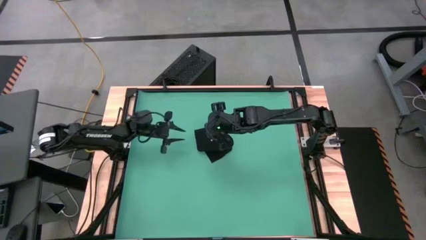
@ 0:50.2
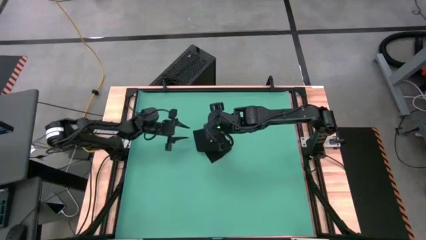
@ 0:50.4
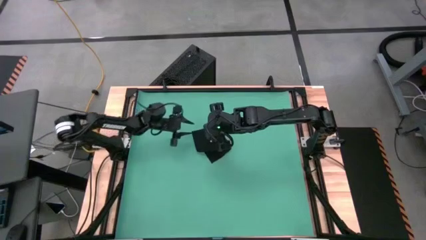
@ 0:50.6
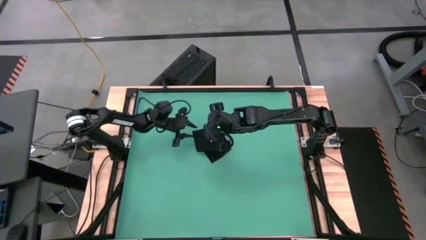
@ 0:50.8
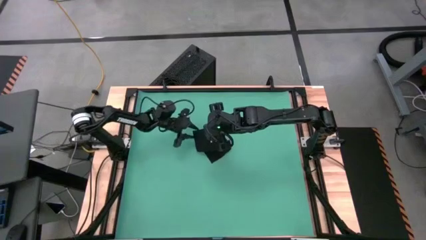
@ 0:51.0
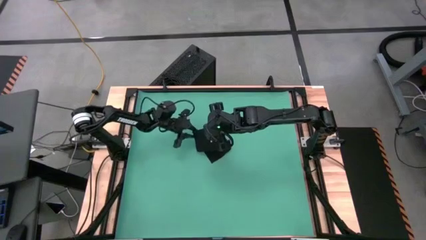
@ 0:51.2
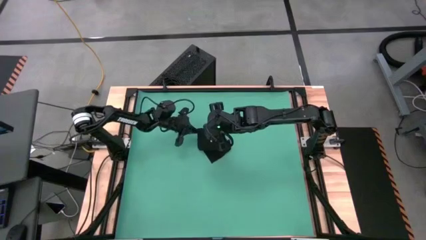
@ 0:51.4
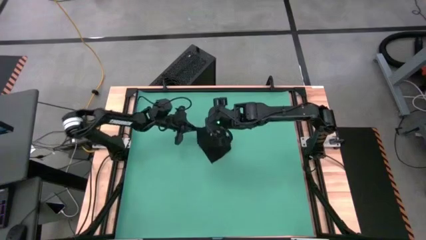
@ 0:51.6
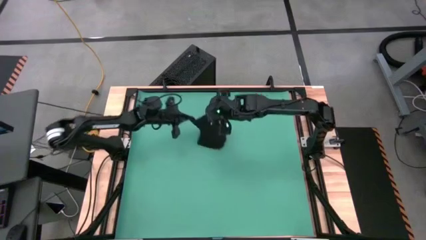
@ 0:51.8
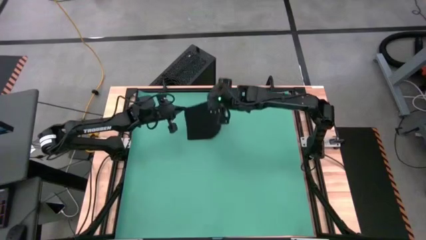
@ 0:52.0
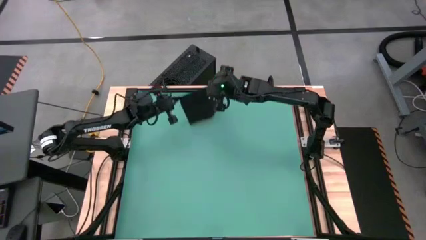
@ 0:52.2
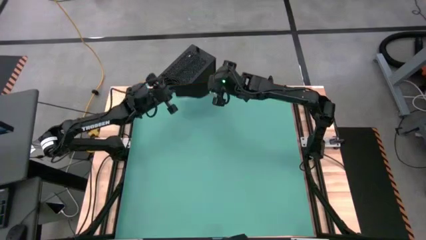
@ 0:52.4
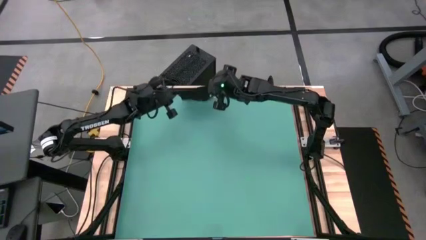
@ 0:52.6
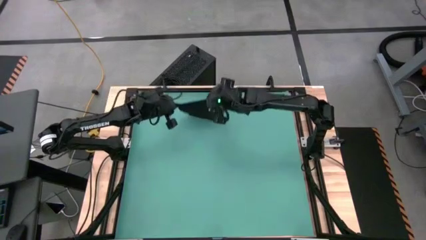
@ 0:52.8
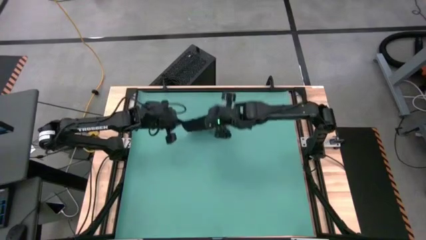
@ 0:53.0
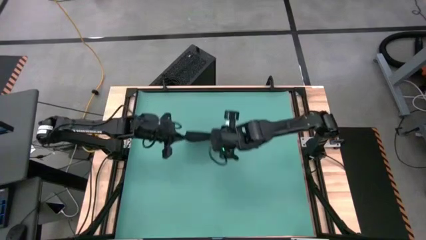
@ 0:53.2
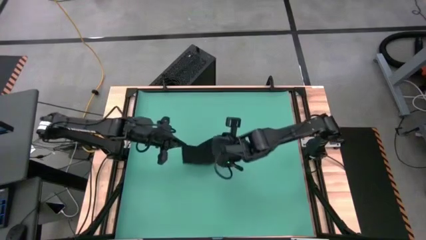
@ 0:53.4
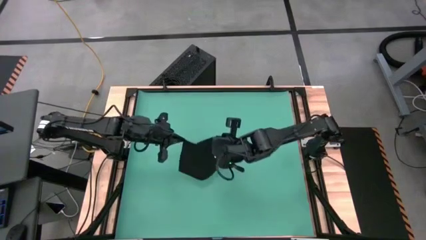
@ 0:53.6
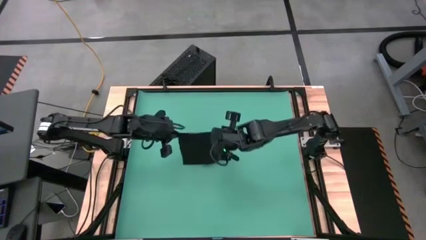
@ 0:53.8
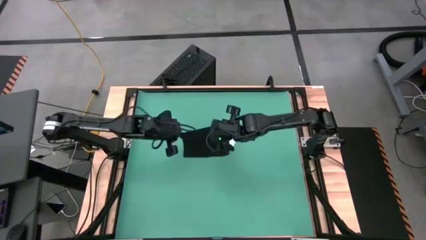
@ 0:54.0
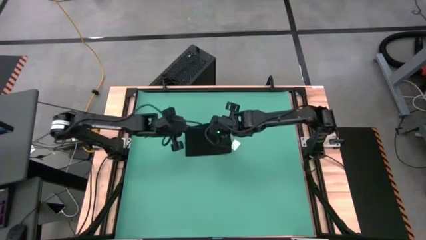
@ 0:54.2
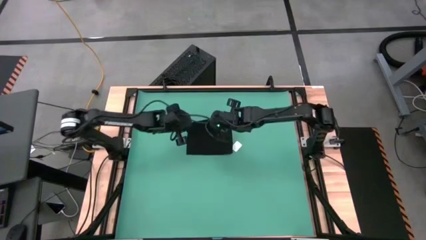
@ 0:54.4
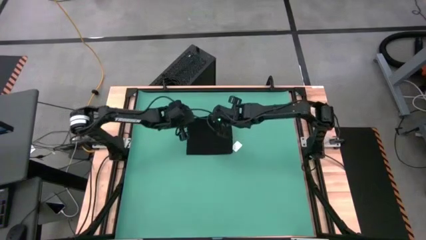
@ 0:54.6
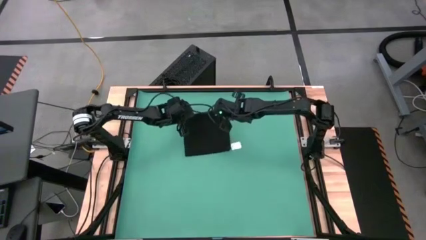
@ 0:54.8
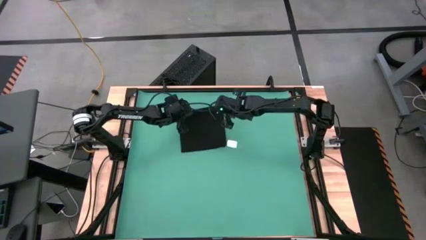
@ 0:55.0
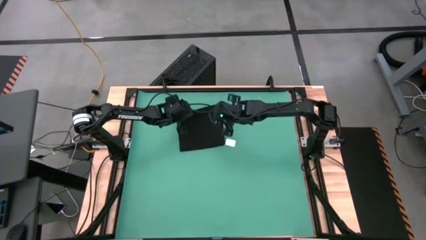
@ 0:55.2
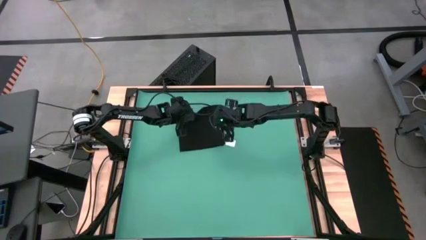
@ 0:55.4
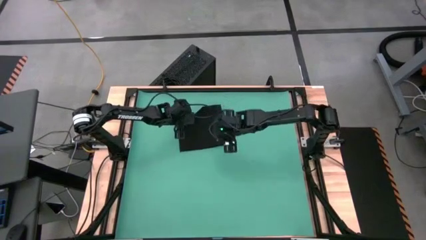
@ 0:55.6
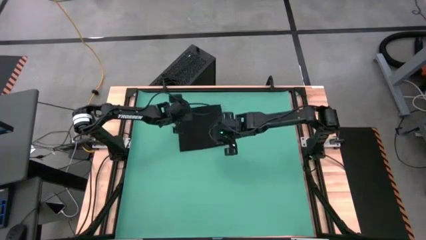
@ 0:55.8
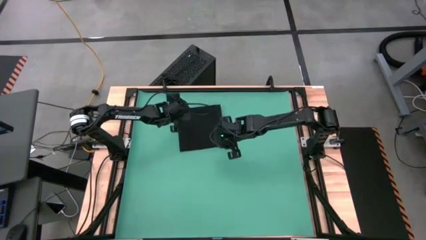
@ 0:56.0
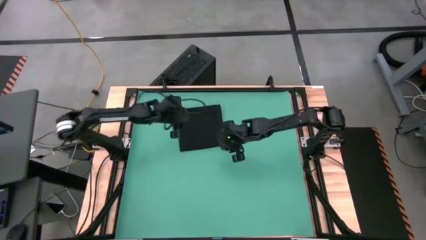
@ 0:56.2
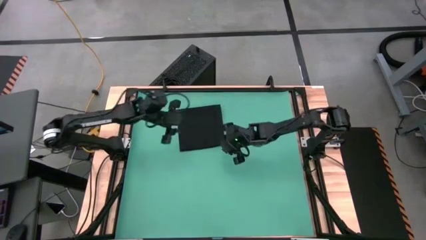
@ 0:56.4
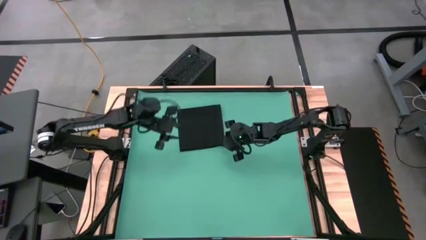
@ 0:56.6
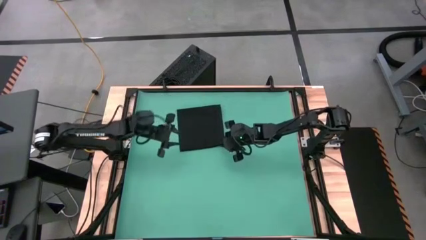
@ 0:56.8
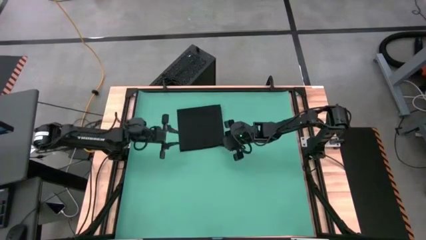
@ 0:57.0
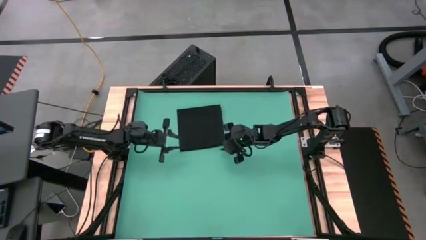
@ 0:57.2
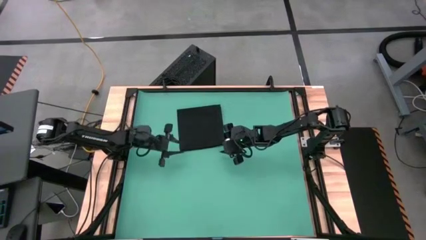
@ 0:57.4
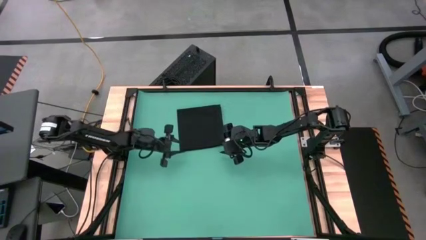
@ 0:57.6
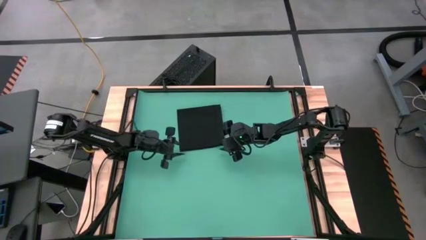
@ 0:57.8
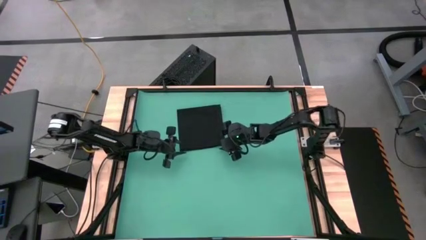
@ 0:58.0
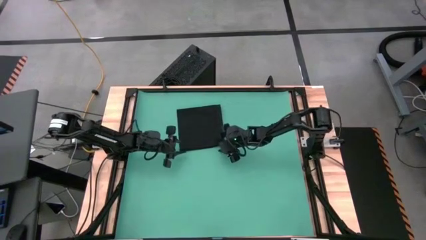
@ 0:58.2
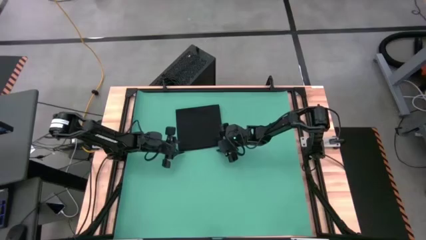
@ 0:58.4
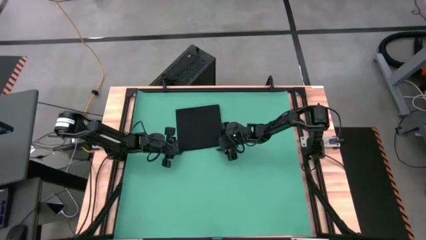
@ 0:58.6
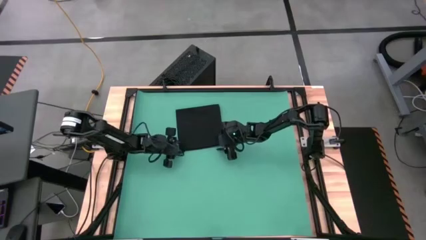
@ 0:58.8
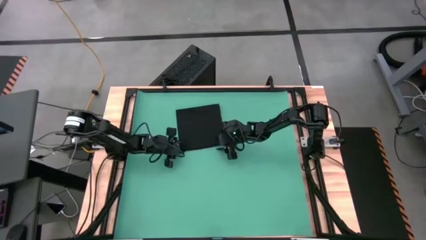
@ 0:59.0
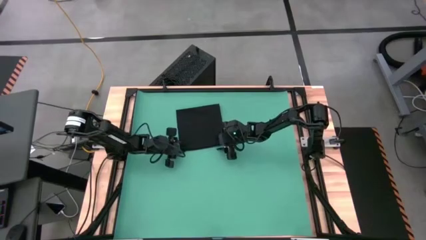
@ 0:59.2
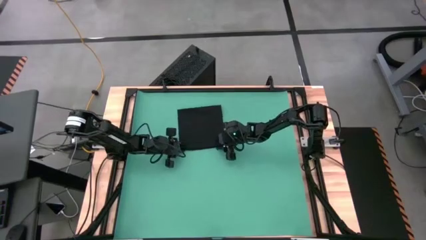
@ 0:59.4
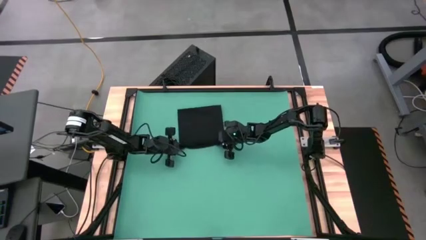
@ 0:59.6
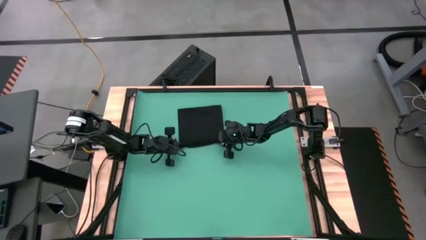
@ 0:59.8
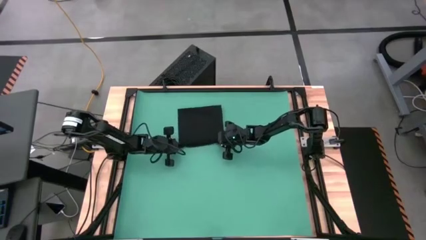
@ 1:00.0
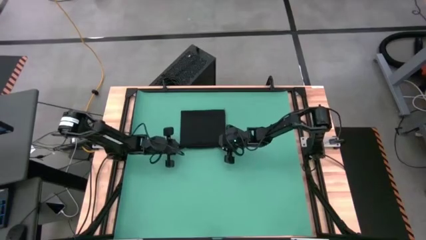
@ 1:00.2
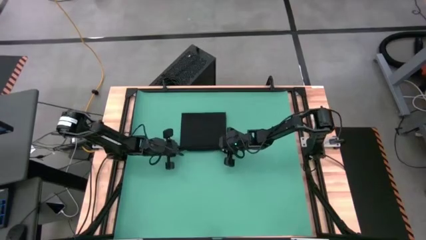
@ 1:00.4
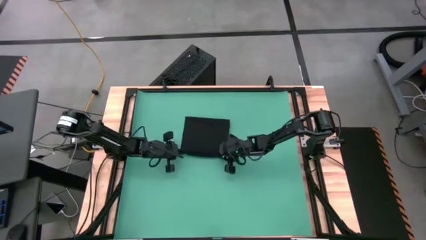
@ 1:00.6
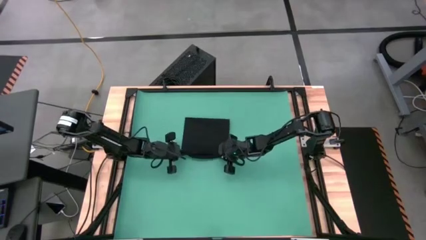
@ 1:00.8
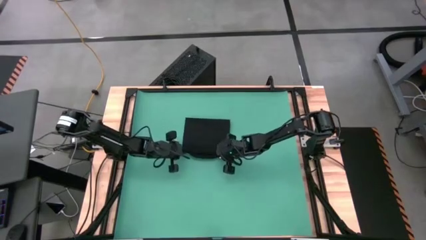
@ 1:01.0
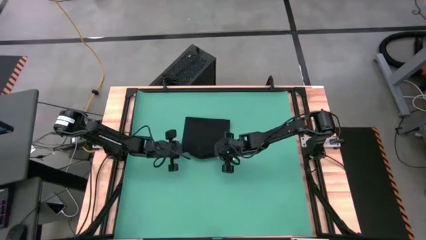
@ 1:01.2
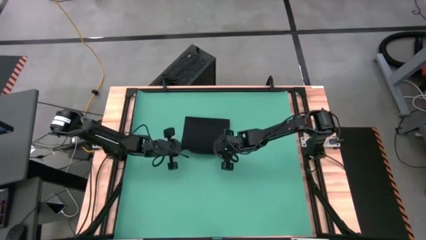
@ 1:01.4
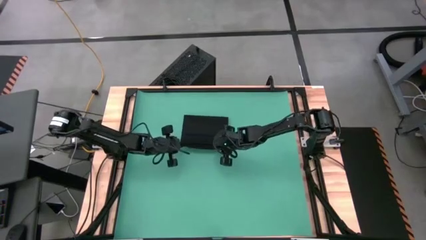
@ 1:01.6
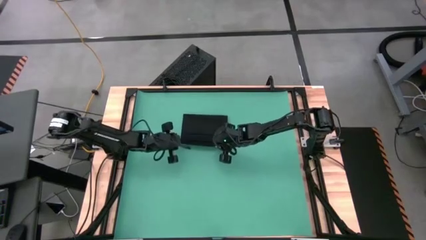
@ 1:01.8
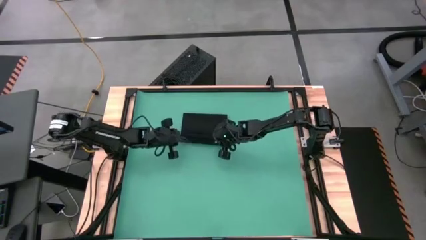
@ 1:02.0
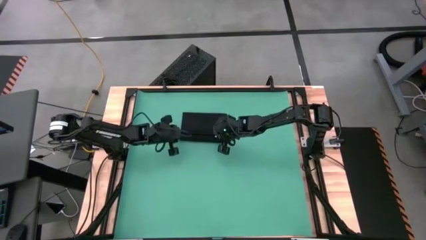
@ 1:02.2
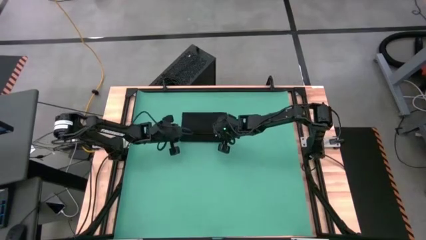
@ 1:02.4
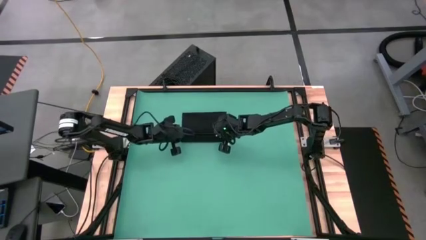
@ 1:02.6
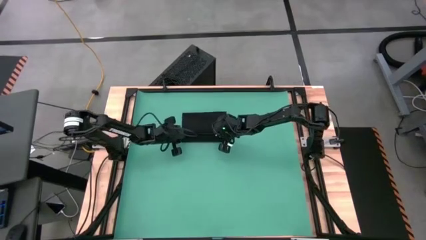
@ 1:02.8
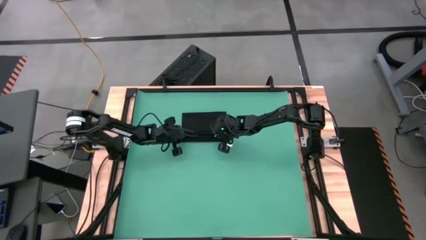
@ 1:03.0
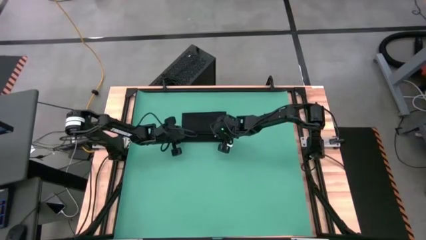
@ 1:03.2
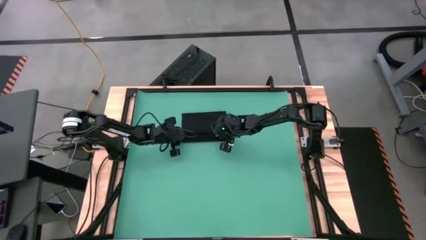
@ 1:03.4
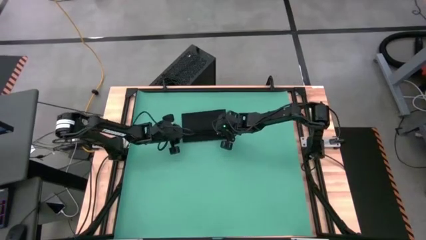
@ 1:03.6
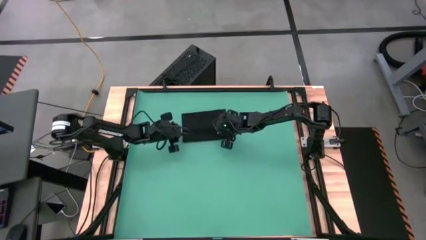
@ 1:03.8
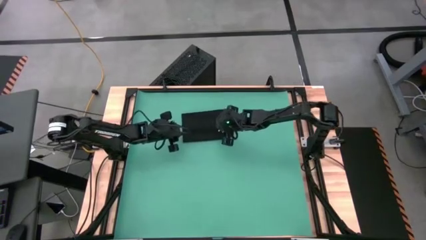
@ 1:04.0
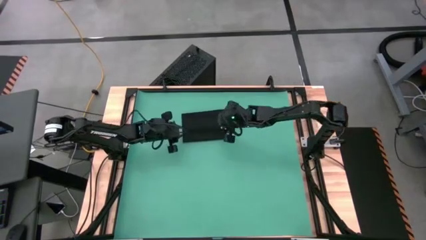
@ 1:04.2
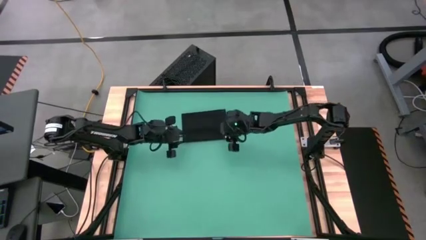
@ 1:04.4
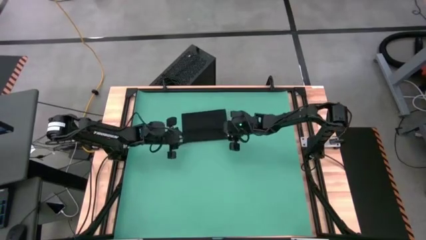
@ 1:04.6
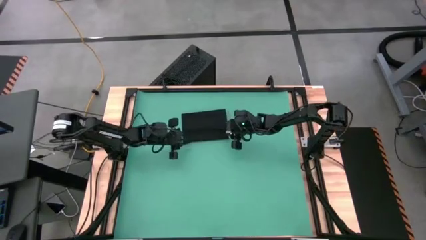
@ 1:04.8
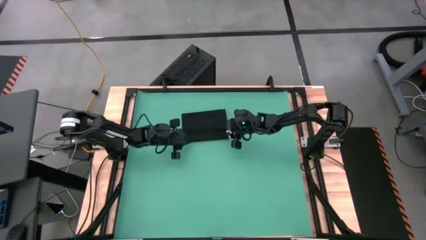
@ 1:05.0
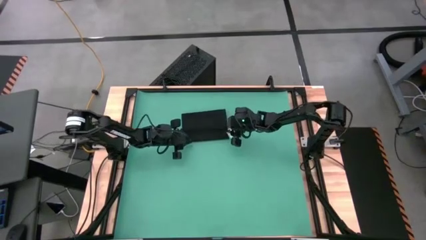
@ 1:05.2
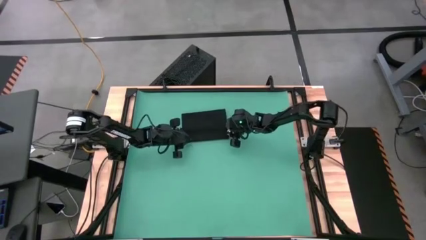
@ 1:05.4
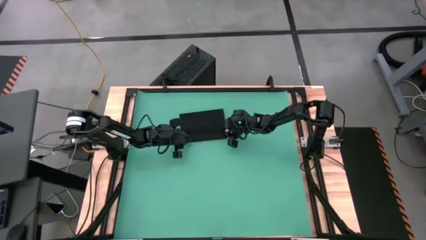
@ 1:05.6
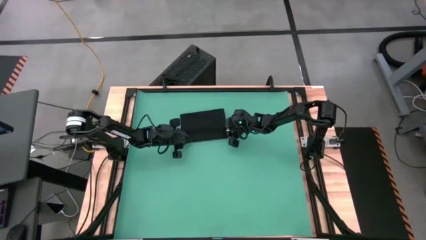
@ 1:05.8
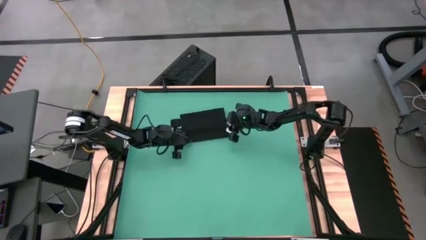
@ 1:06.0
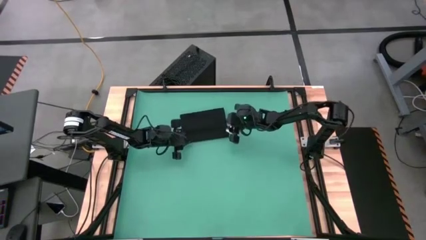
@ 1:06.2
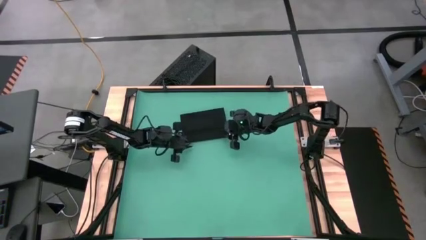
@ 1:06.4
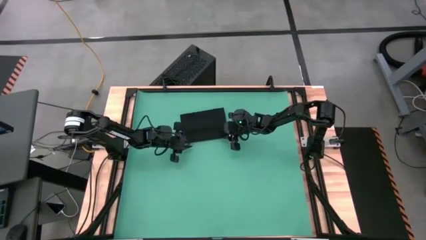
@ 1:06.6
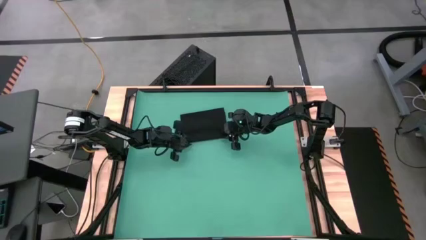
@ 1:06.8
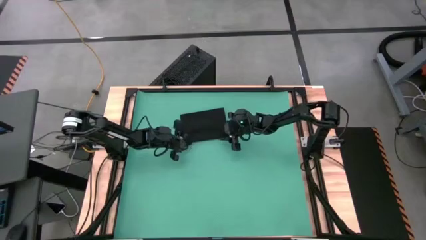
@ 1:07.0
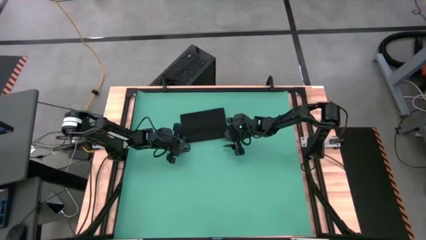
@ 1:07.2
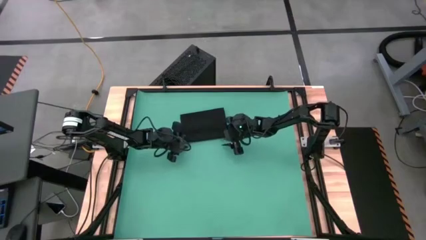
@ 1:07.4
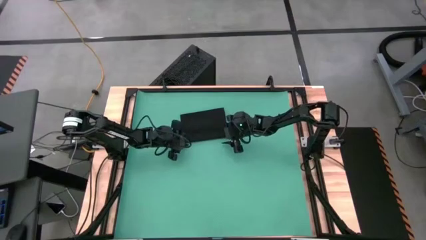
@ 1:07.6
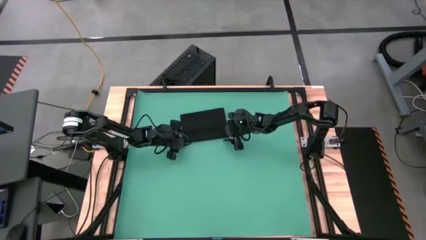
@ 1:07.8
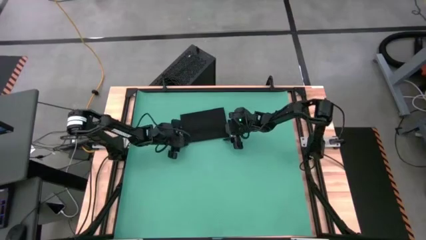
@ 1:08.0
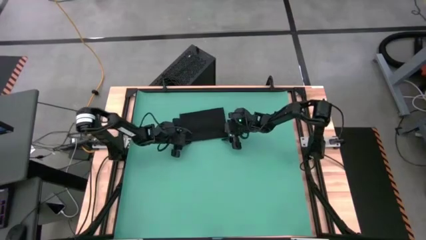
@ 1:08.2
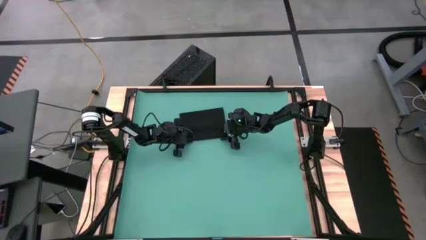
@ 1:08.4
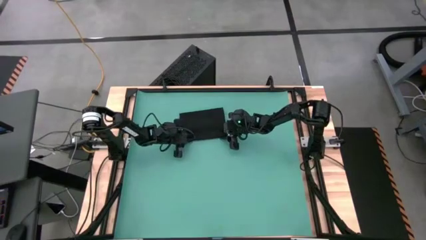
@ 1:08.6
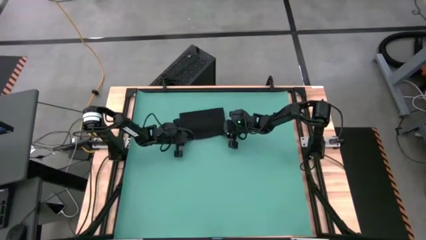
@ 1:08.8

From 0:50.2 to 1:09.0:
Task: Roll napkin
Roll the black table napkin
